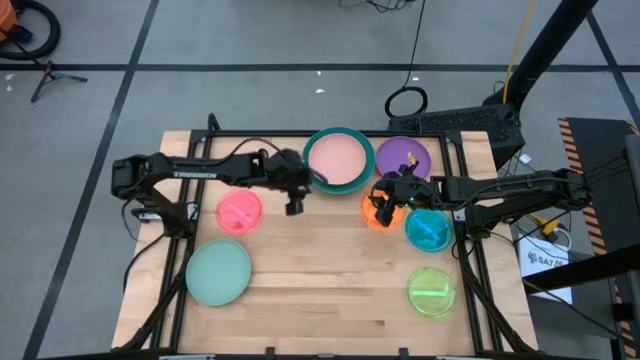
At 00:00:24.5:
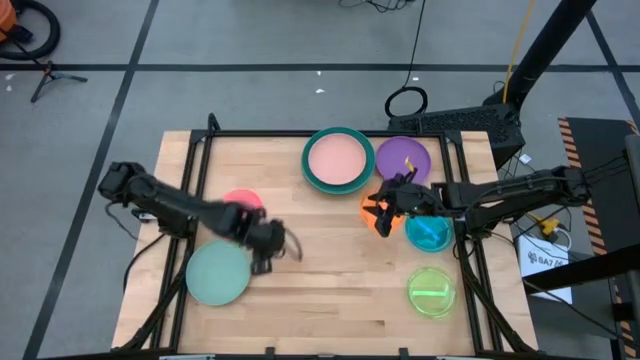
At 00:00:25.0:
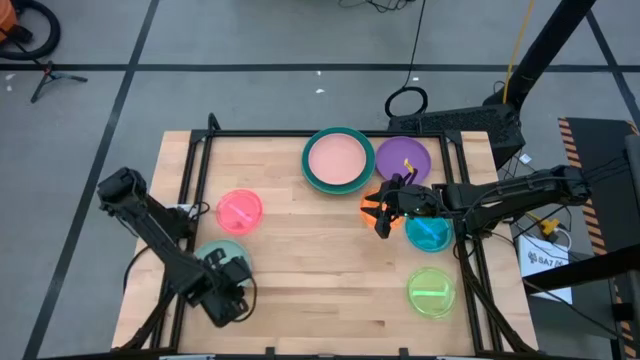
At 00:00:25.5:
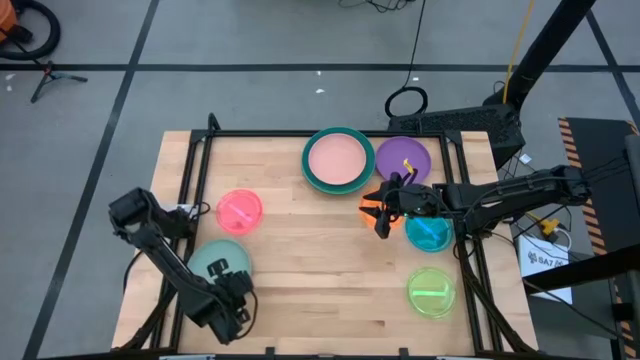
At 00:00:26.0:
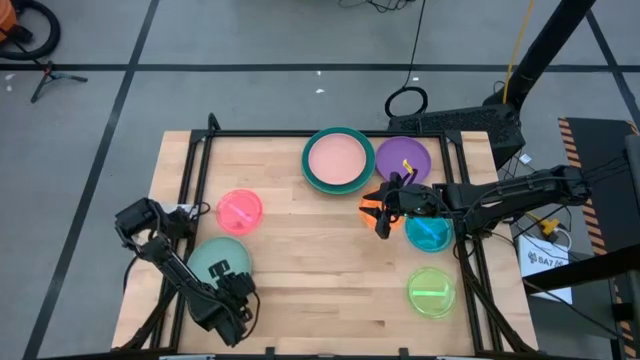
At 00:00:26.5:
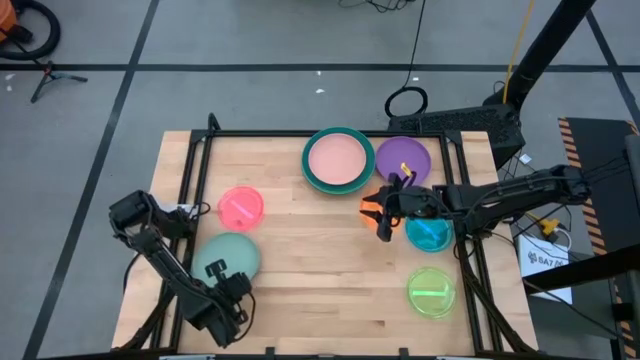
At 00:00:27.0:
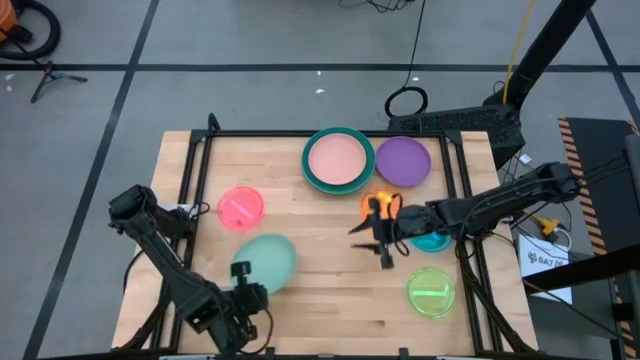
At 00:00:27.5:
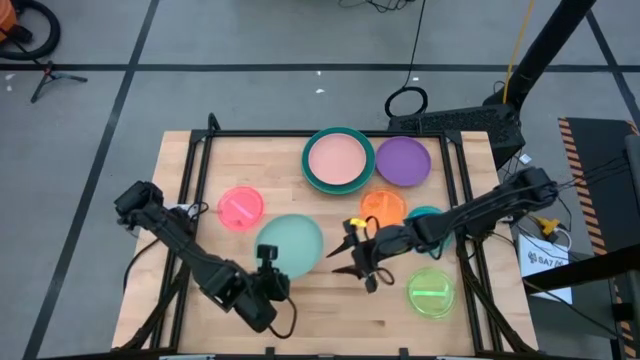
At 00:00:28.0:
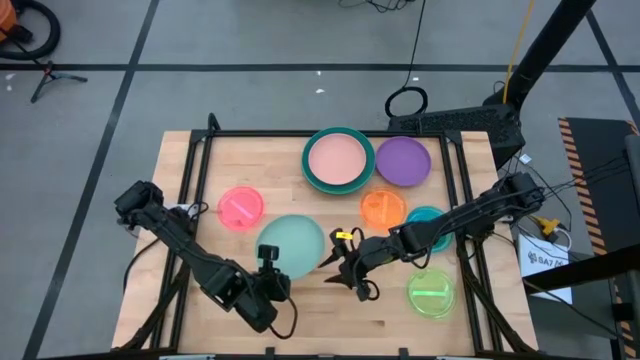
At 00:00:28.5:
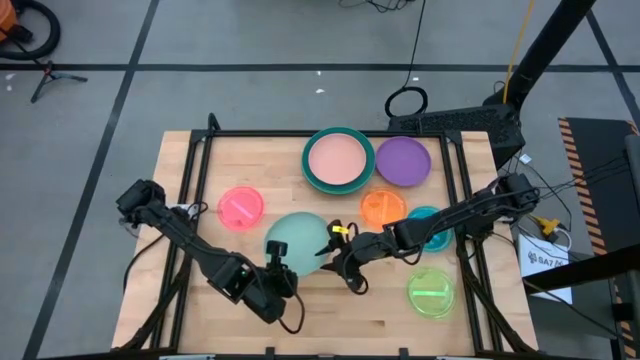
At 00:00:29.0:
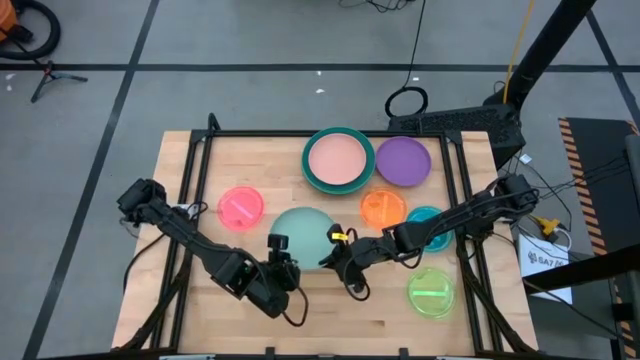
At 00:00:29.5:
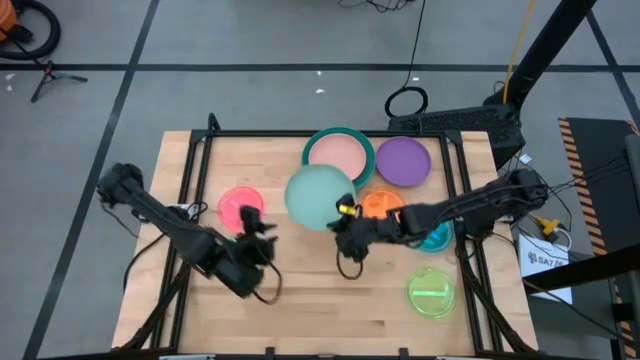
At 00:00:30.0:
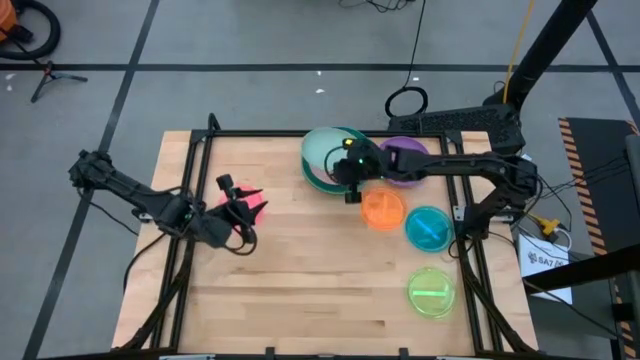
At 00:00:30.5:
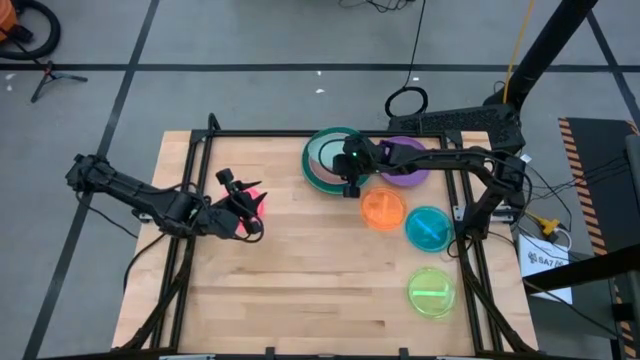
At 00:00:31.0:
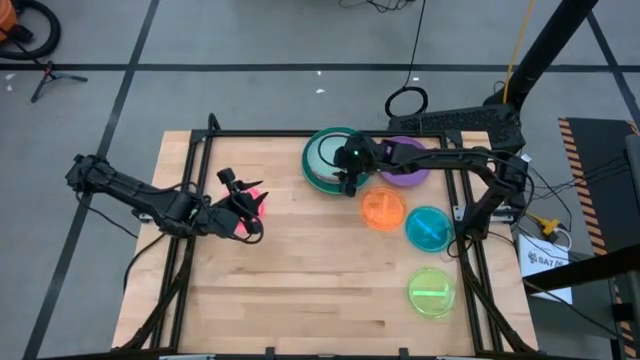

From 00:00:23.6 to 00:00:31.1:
Task: Stack plastic plates
Stack the light blue plate on the light pink plate

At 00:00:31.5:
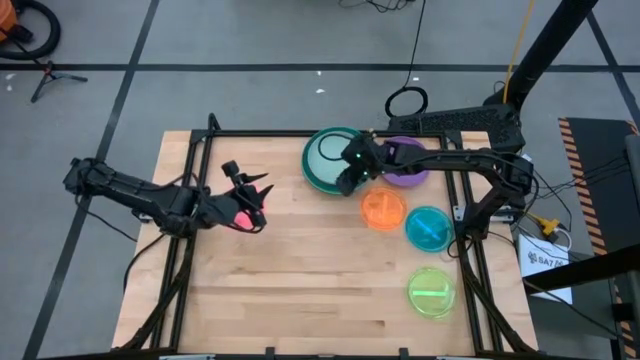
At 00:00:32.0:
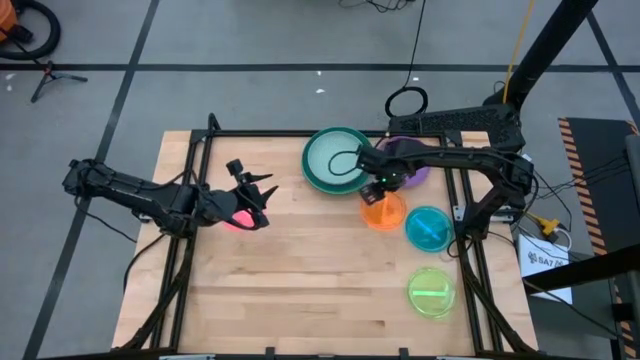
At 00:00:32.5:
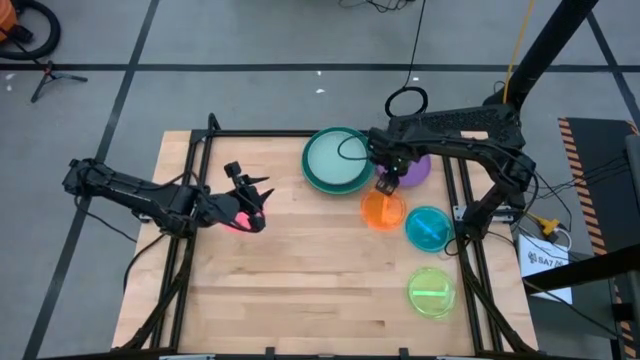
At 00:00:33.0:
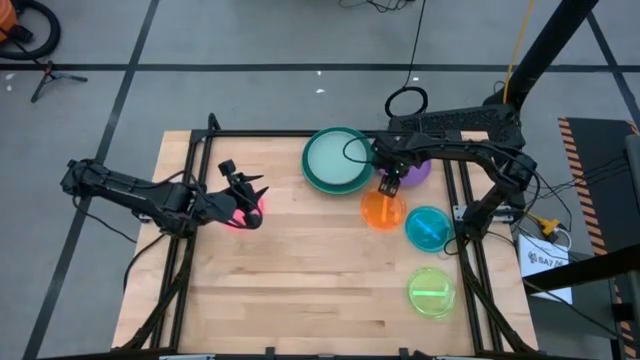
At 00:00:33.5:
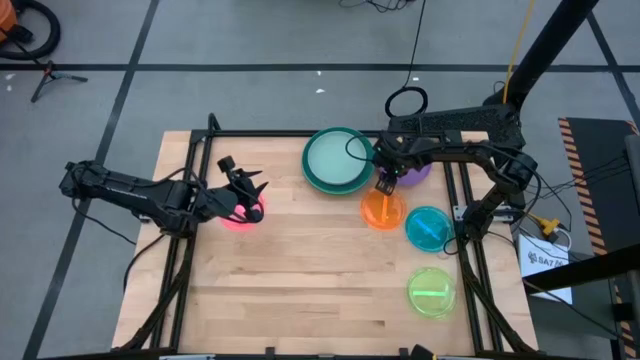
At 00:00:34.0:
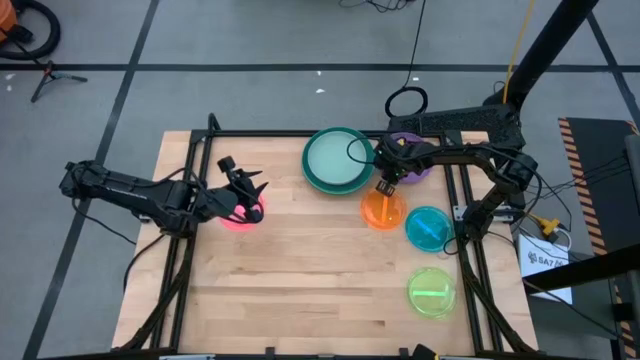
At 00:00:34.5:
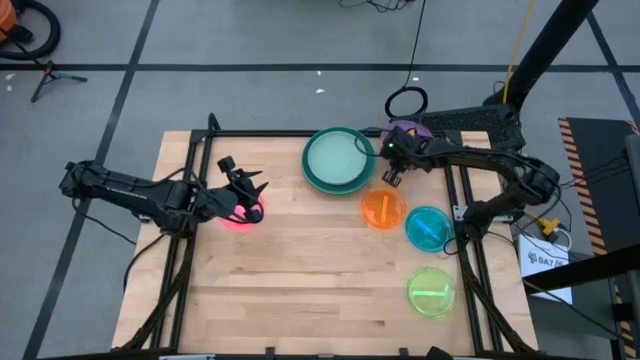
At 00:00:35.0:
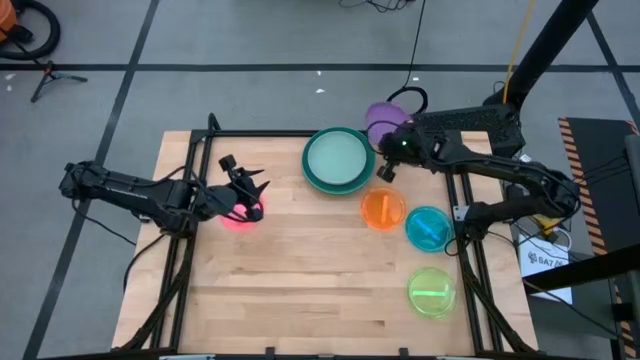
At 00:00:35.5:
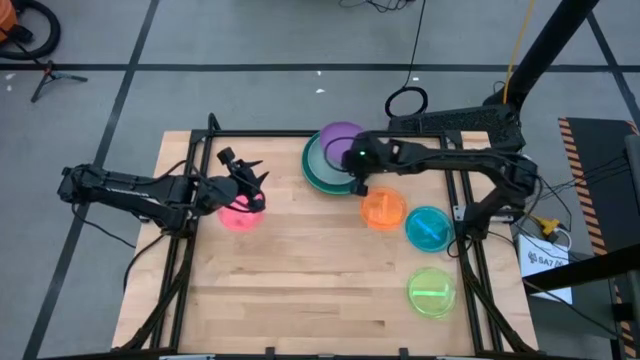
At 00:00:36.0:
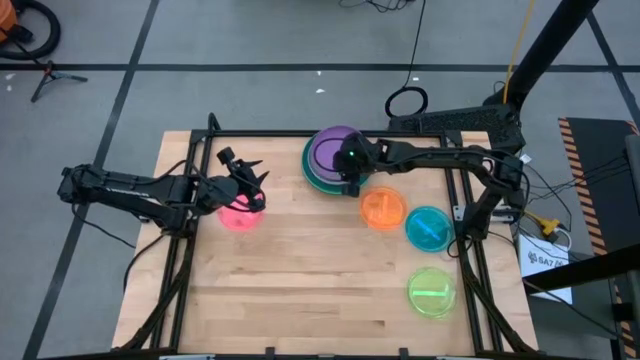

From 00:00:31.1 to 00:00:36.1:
Stack the purple plate on the light blue plate

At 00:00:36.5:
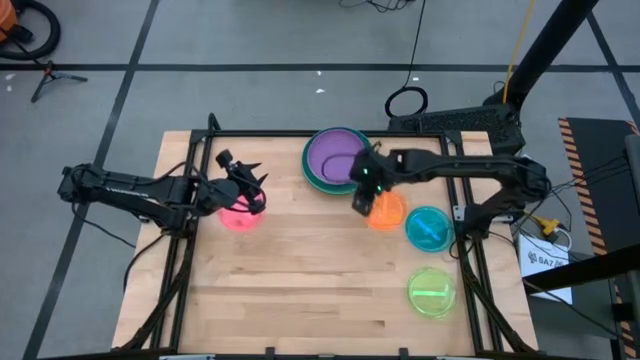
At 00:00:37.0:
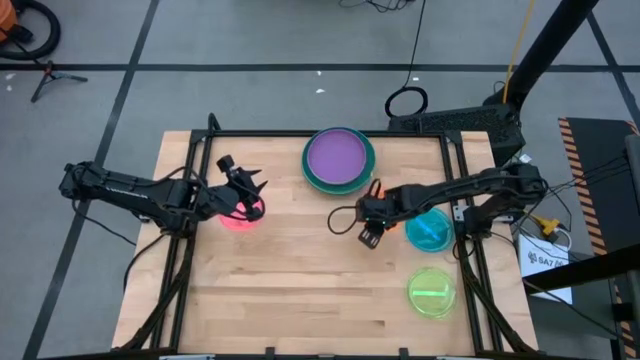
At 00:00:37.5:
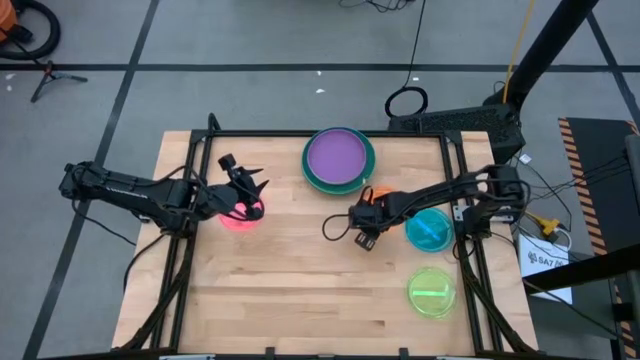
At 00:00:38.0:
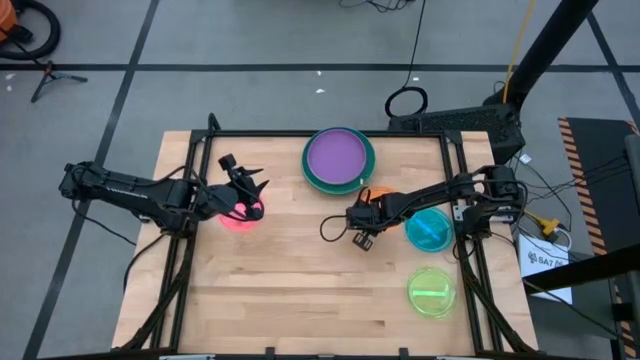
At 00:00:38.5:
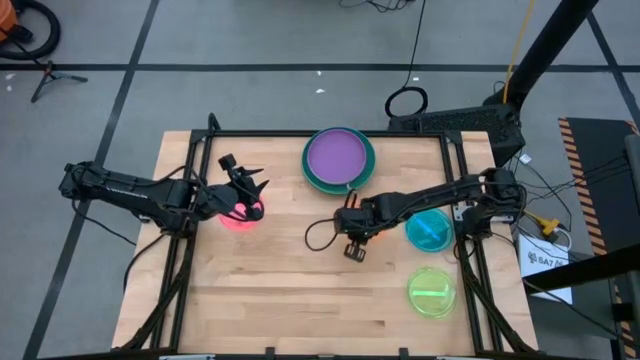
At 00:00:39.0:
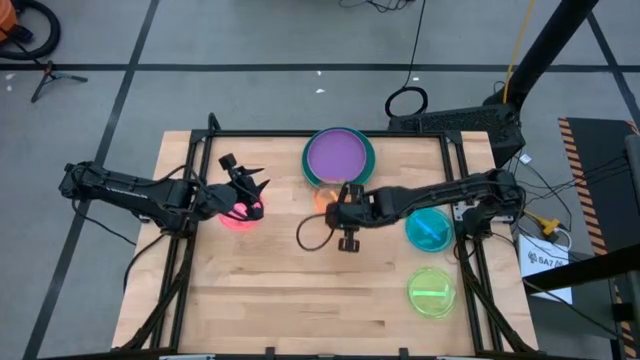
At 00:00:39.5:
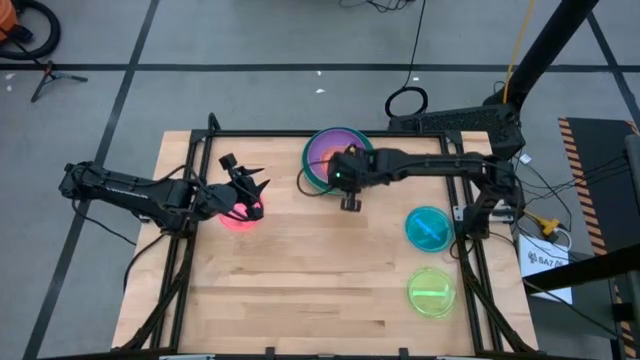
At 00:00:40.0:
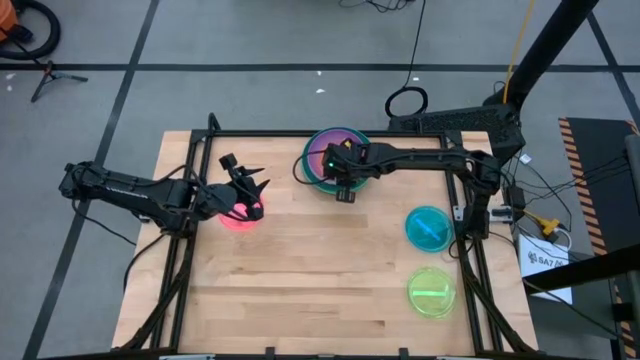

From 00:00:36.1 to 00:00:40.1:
Stack the orange plate on the purple plate

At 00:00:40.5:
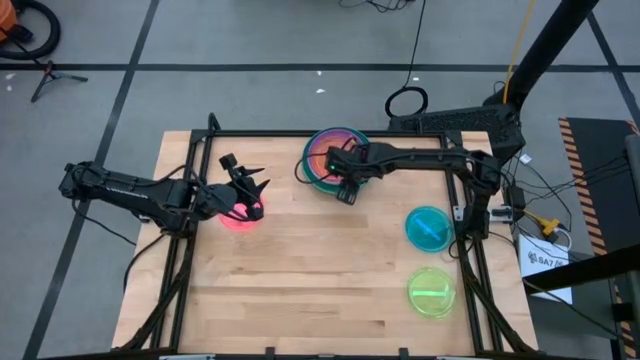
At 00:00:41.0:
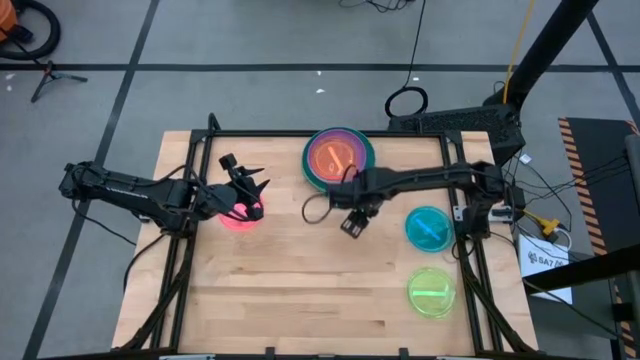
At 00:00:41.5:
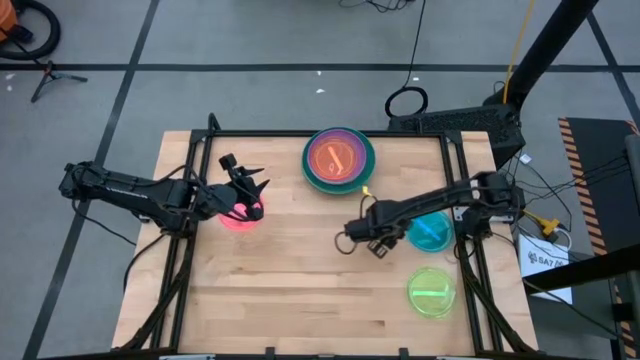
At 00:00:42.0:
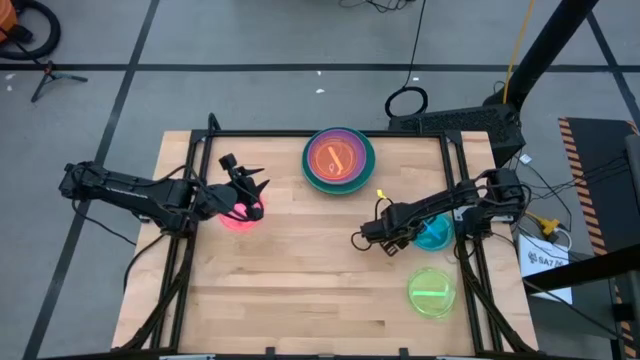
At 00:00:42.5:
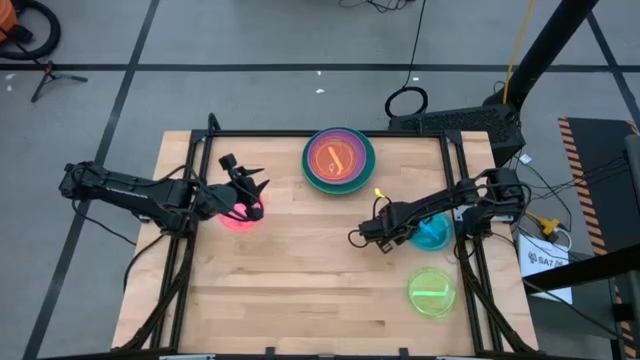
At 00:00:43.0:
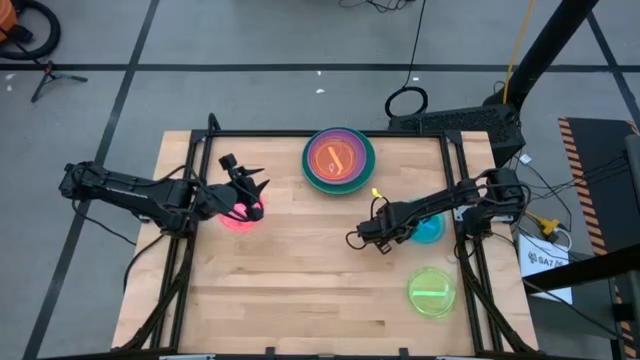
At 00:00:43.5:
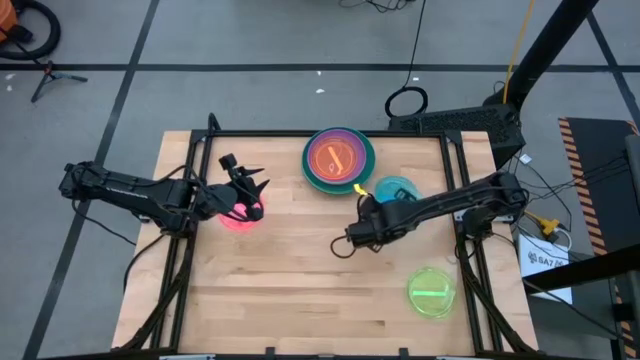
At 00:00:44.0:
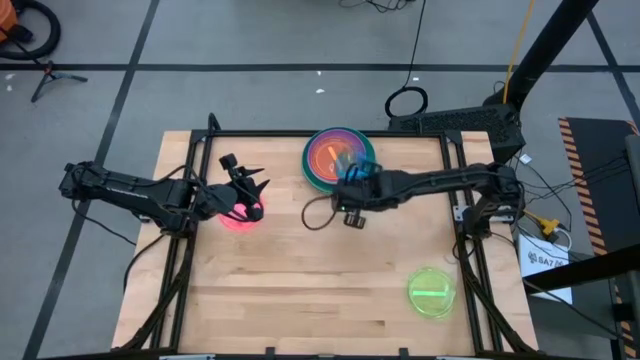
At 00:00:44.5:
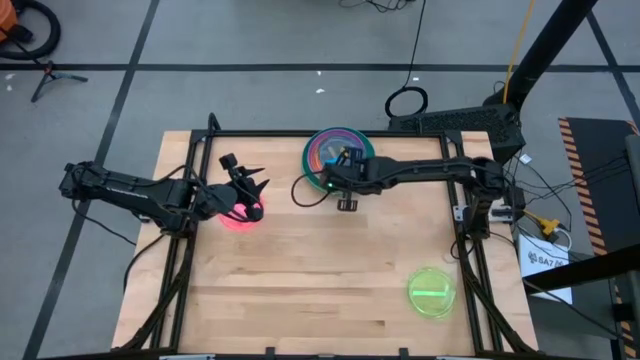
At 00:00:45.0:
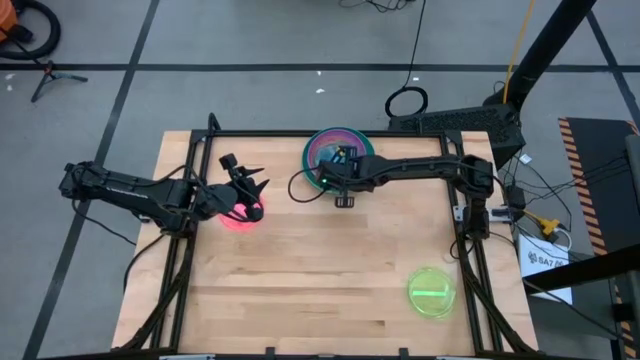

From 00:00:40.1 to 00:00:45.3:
Stack the blue plate on the orange plate
